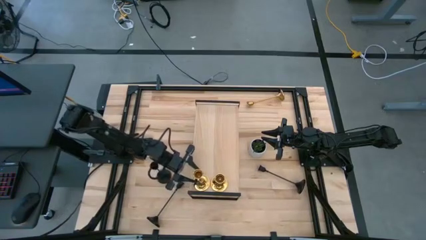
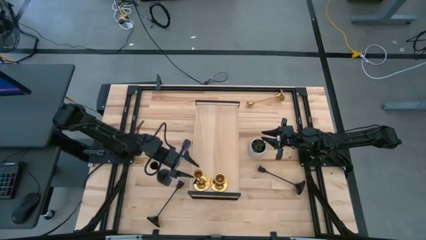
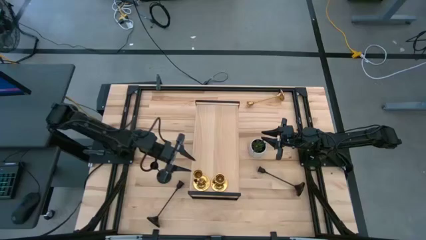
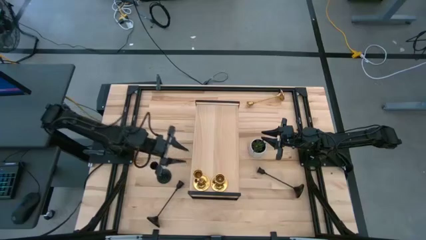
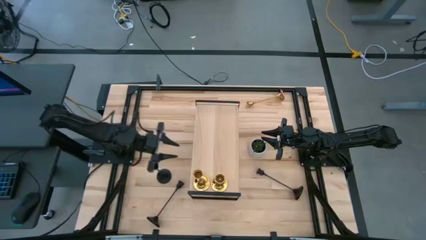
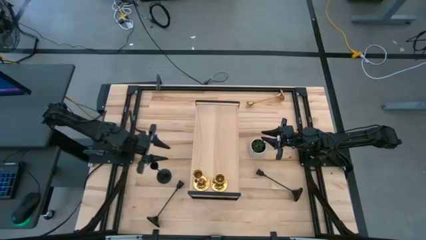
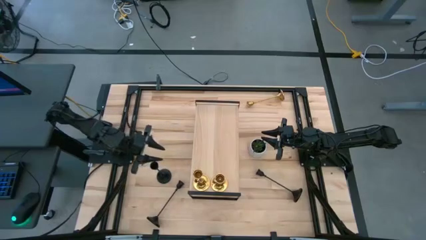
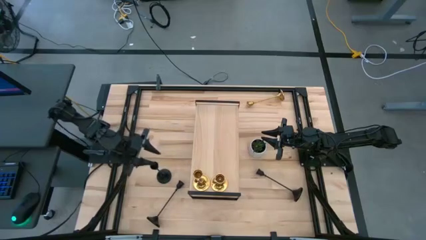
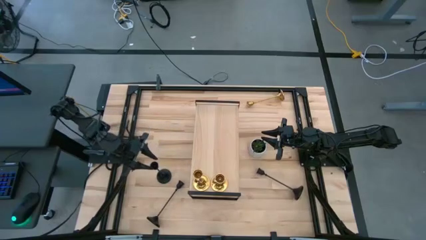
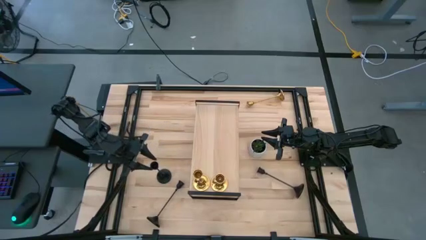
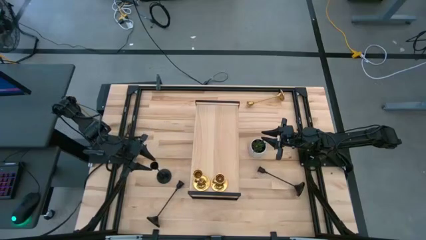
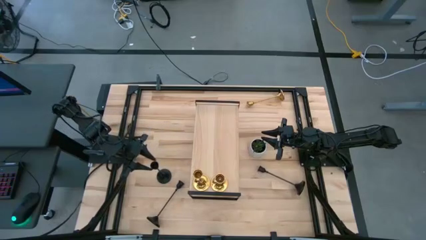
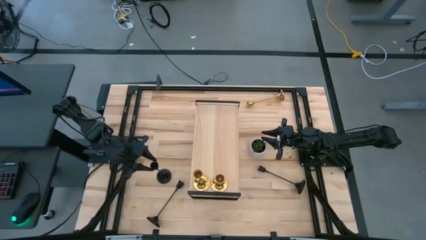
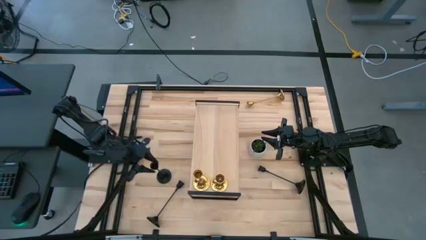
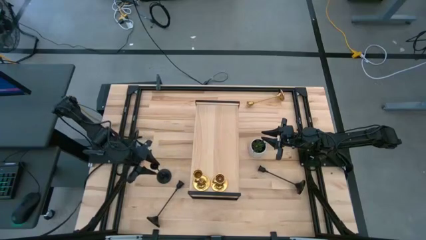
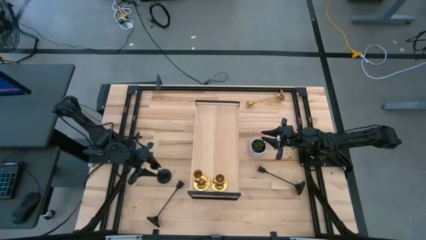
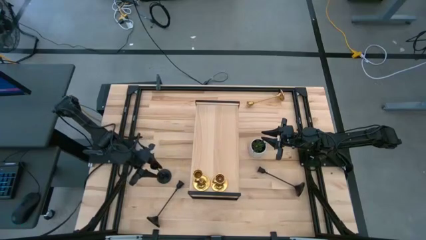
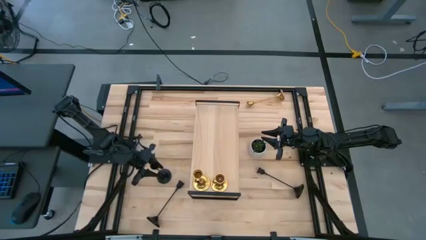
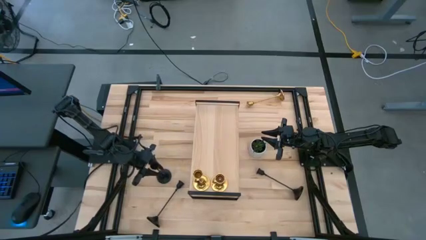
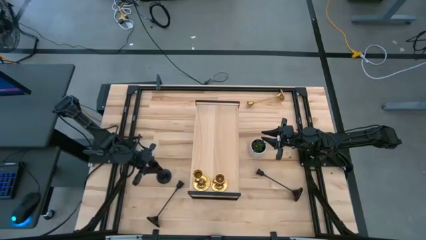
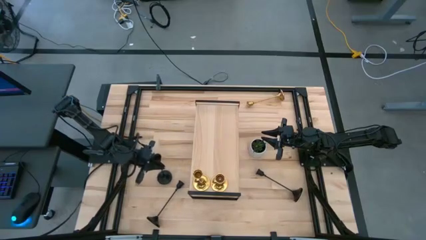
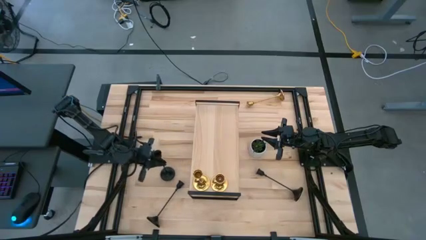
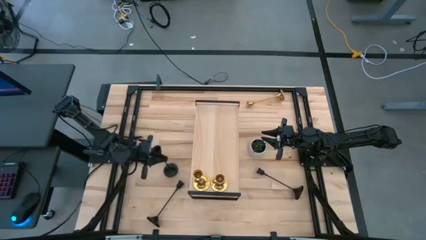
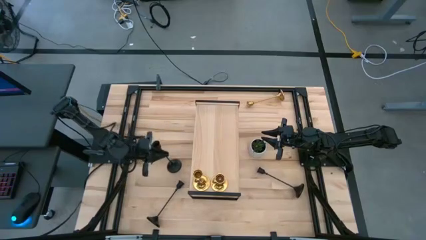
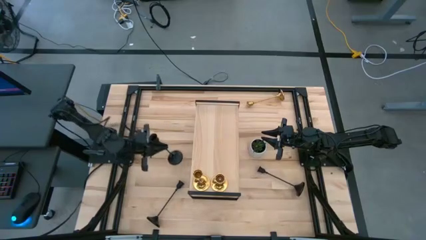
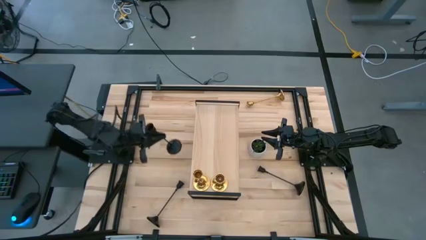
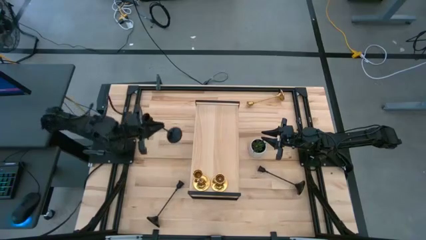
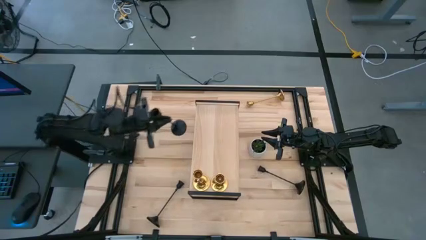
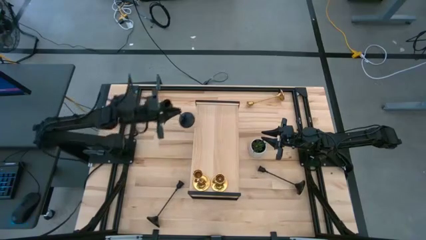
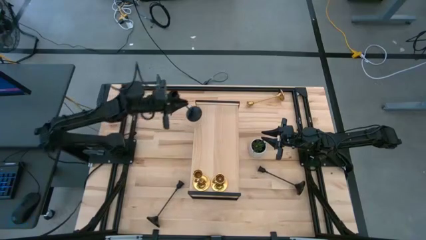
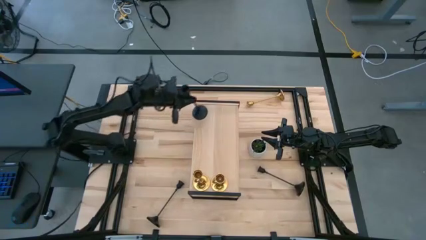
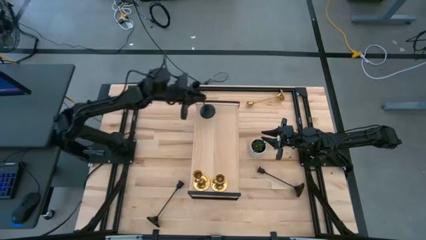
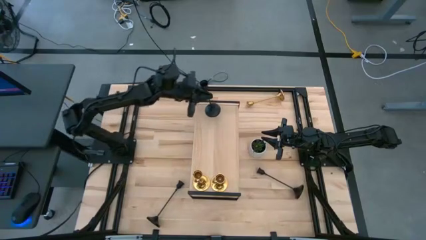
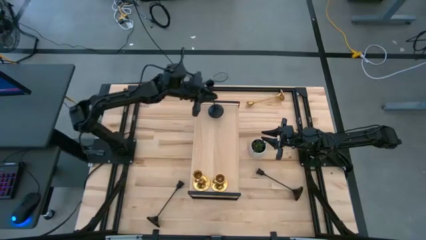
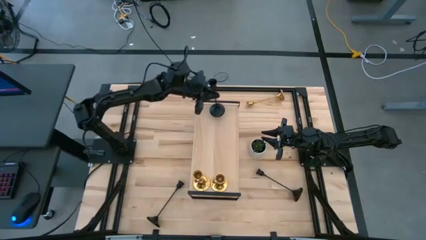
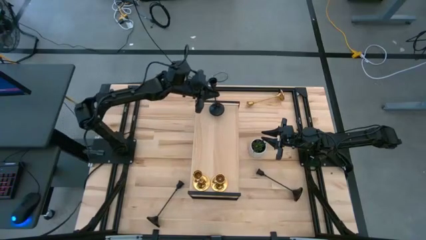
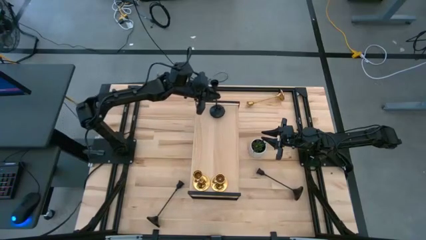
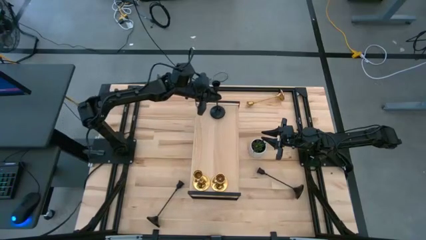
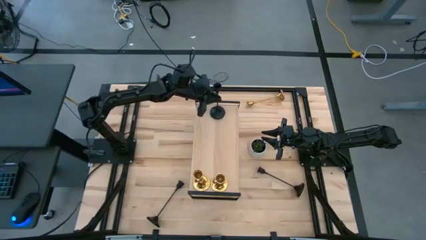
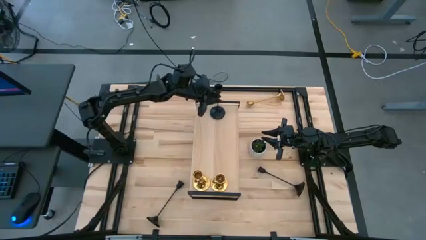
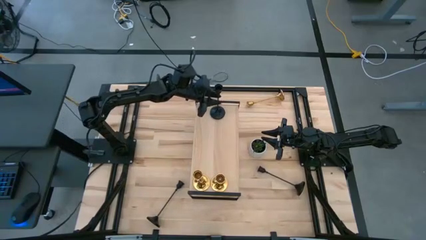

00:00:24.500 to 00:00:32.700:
Task: Pick & Place candle stick holders
Put the top left black candle holder on the shelf

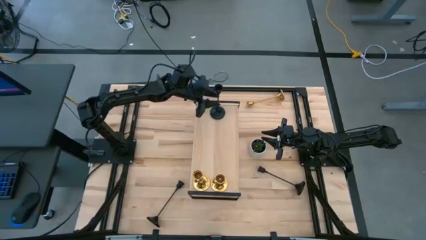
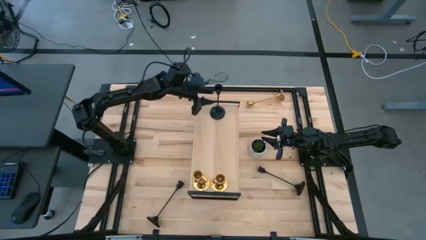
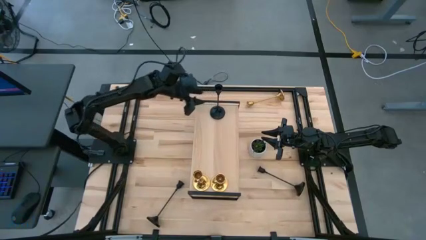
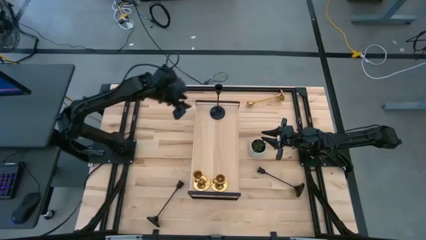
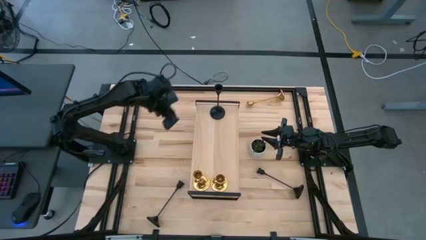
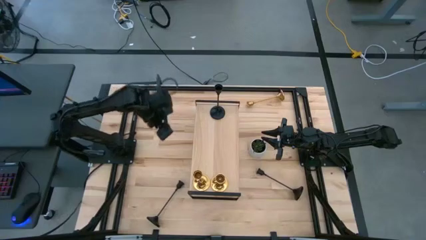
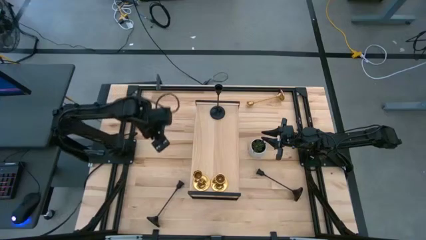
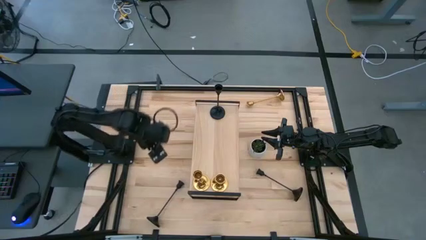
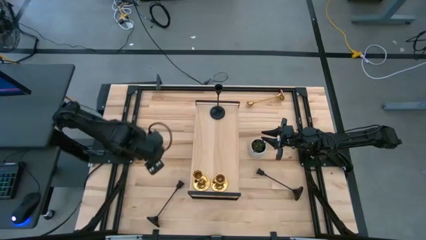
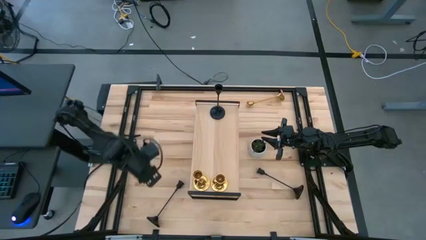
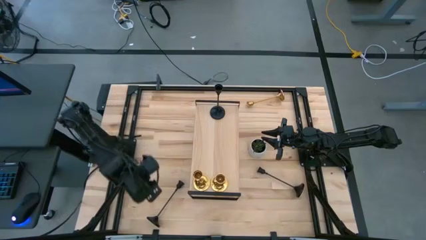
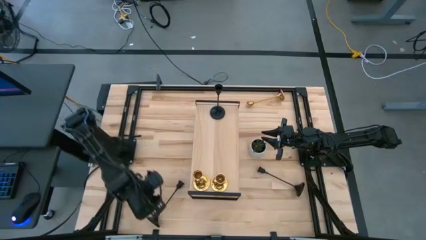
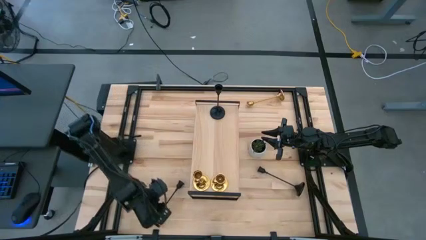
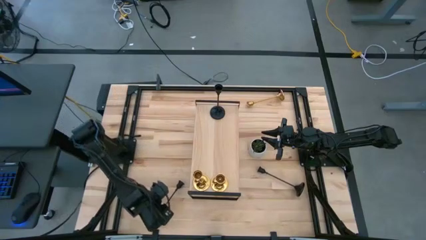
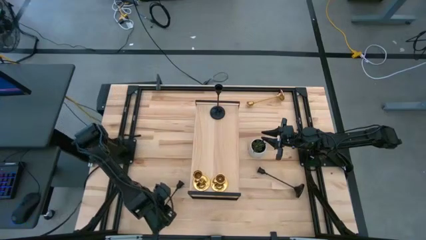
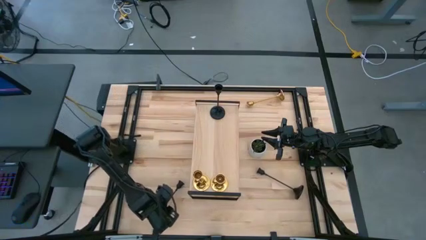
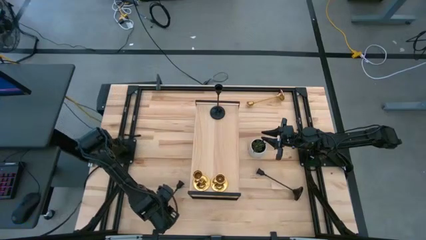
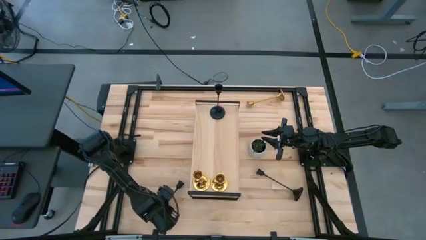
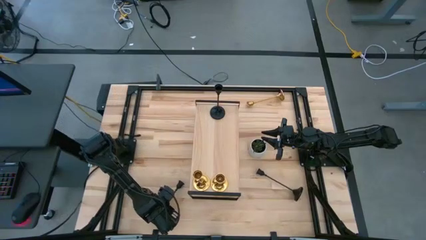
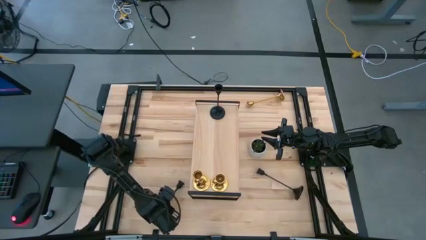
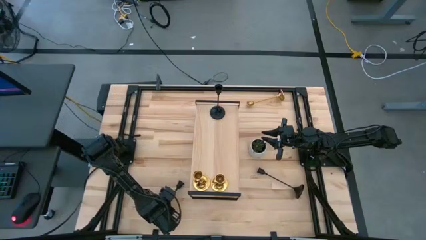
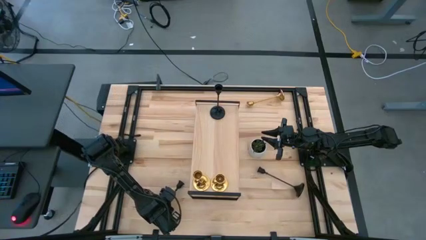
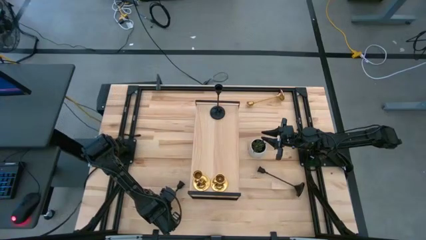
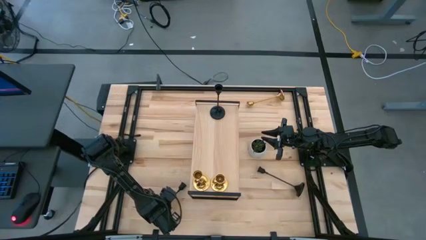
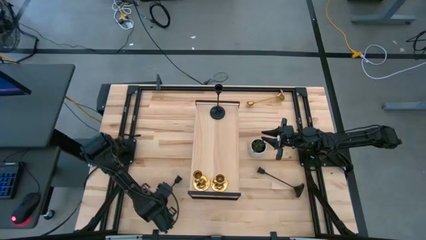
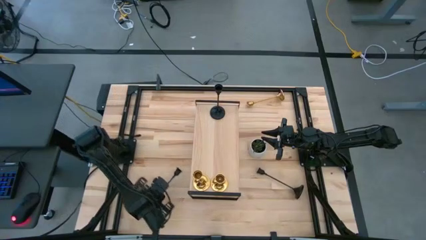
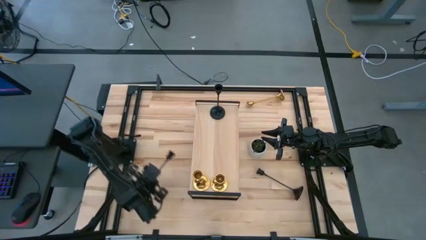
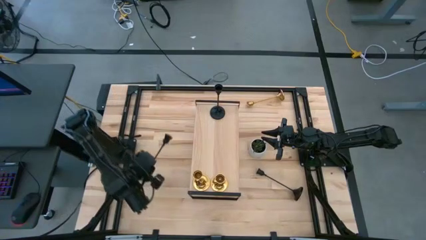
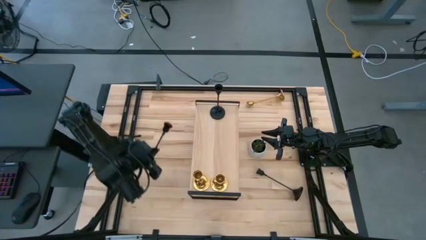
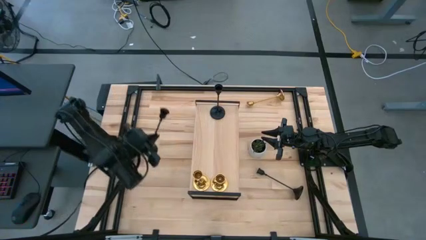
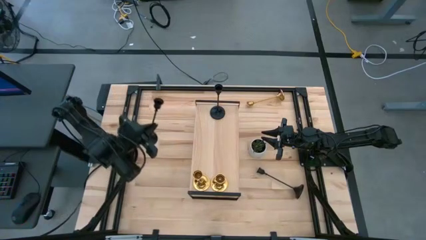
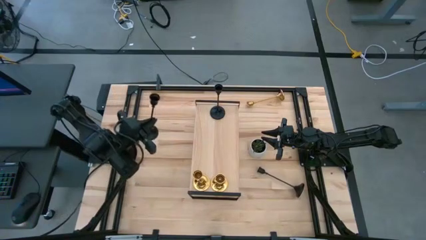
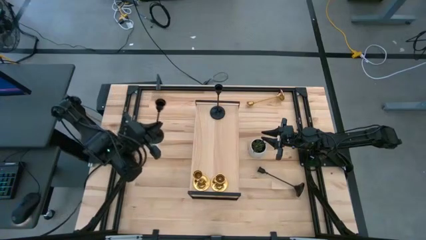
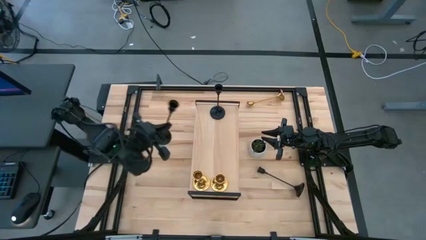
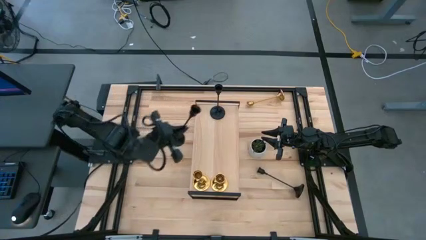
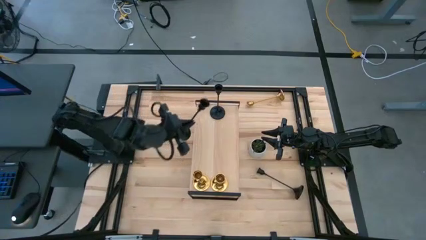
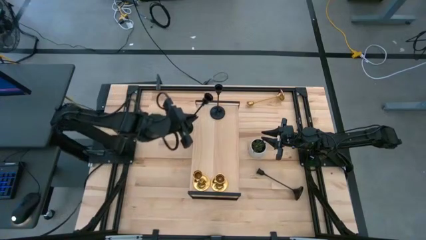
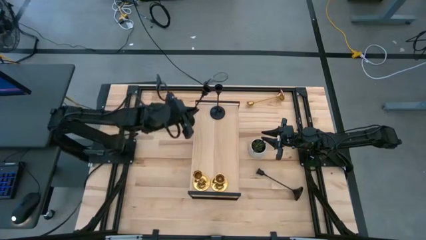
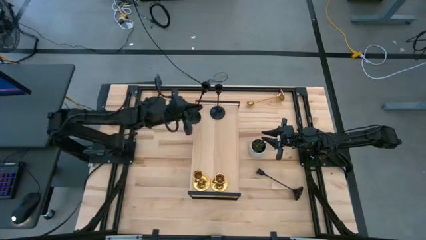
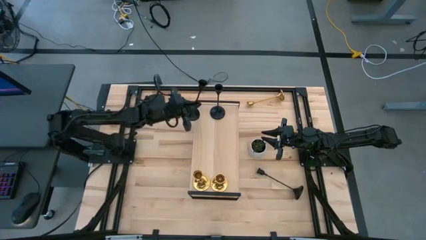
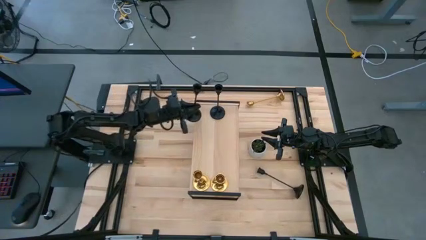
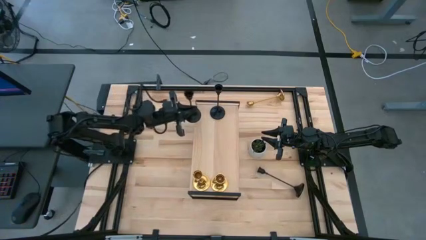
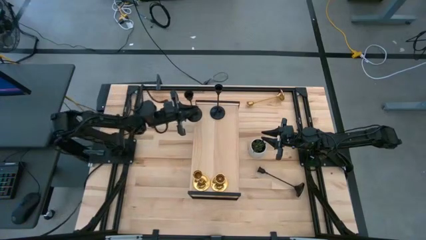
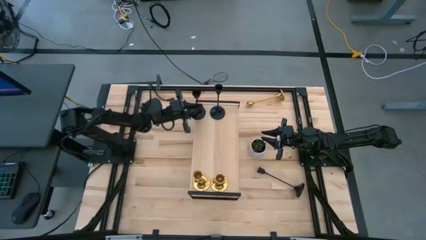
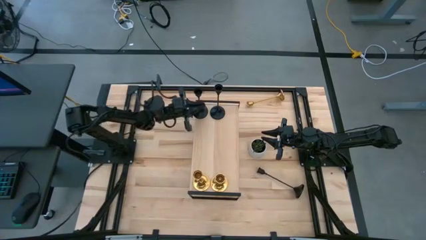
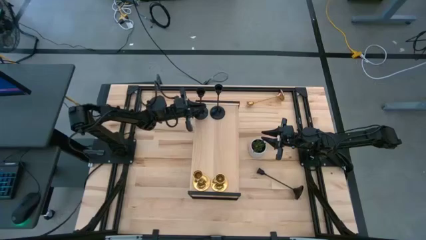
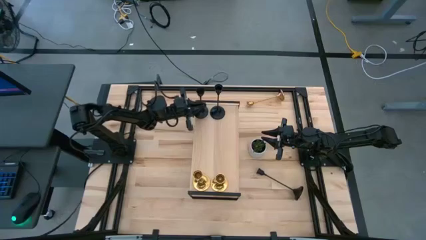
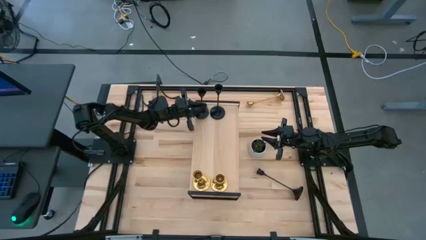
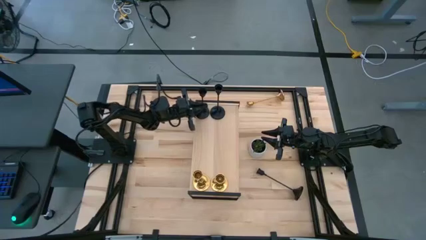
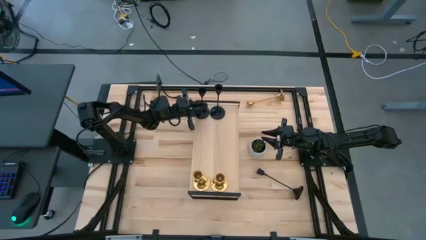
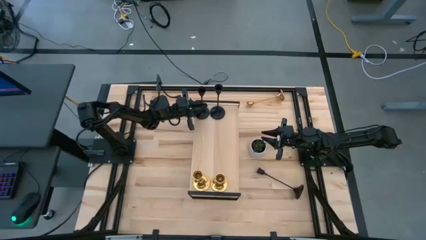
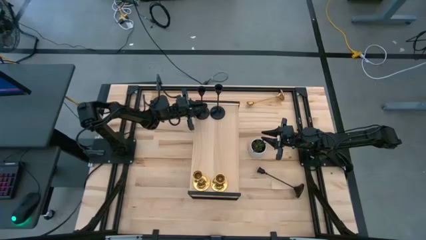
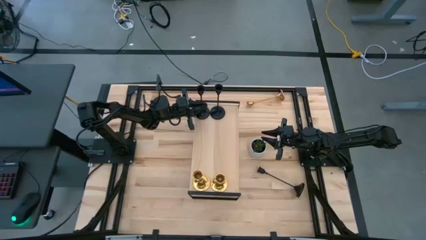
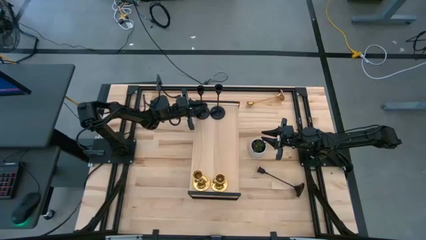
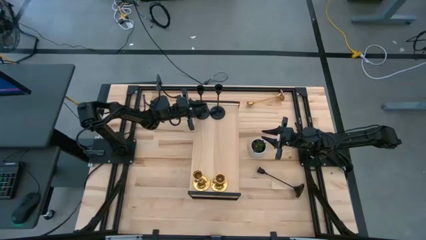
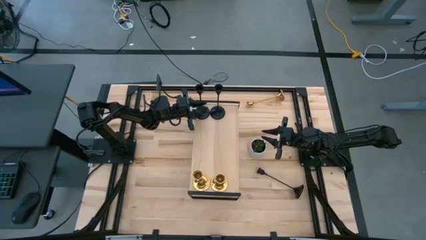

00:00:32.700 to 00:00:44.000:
Put the left black candle holder on the shelf aligned with the other black candle holder
